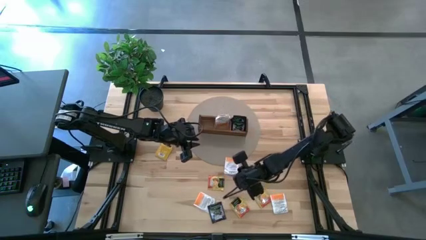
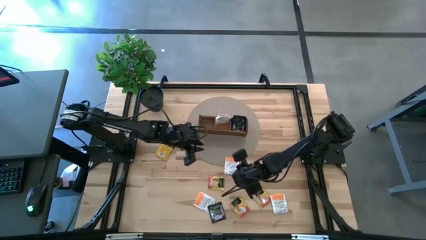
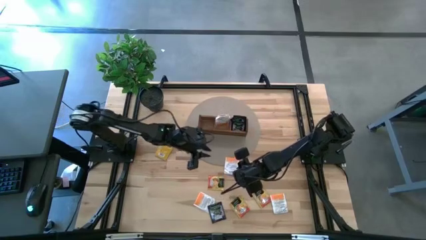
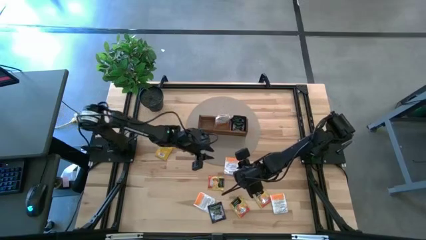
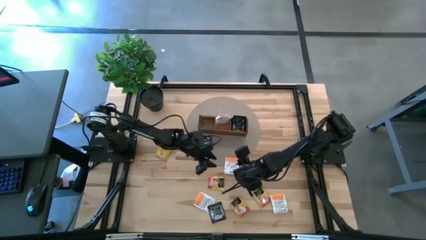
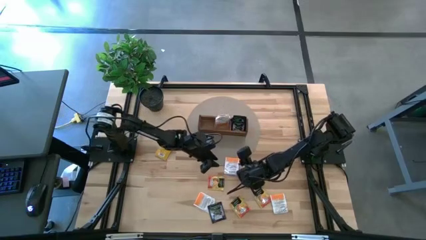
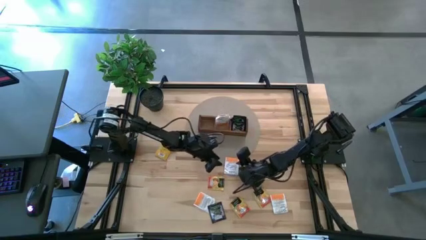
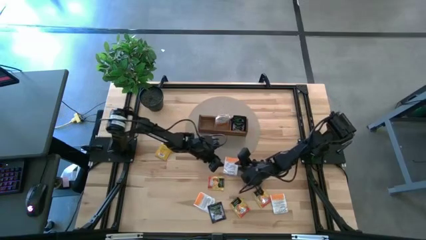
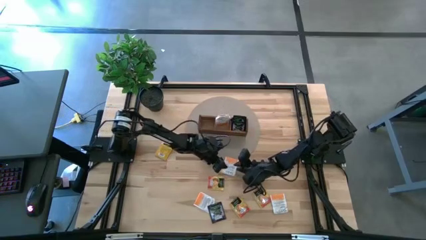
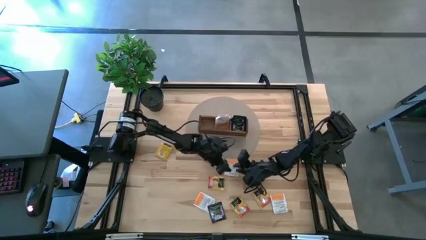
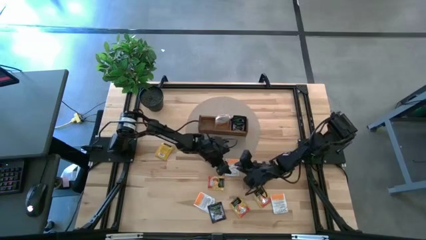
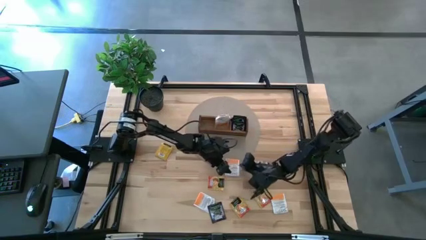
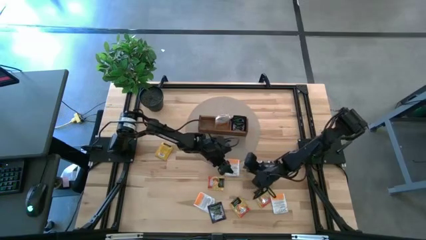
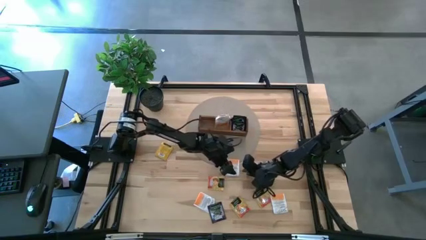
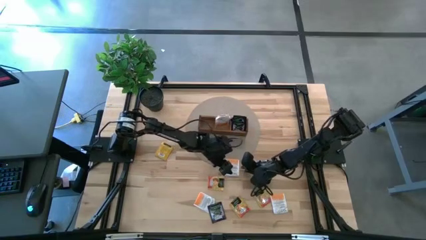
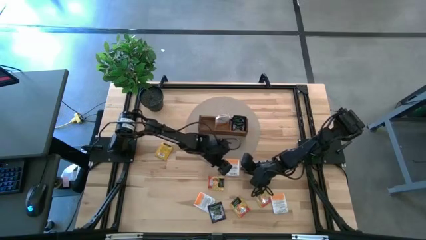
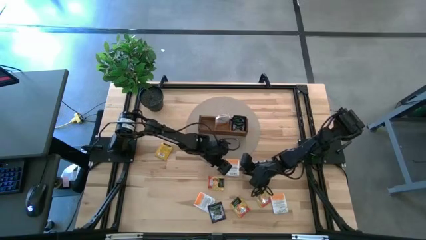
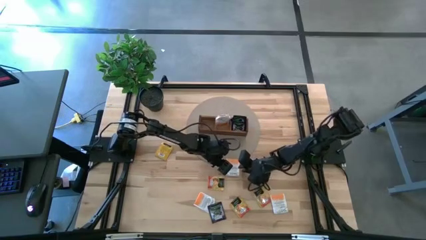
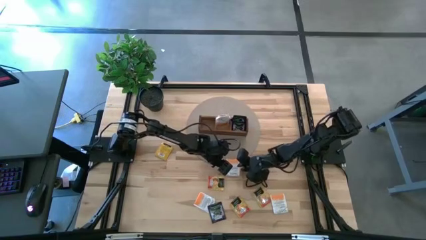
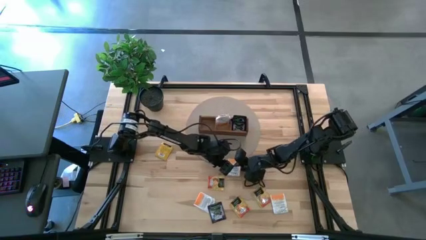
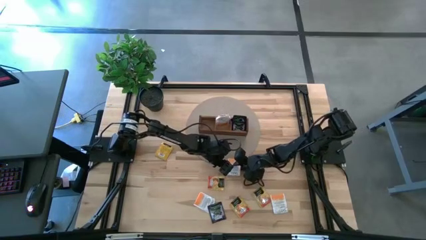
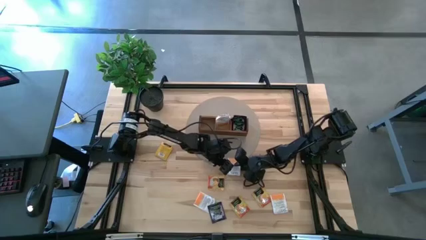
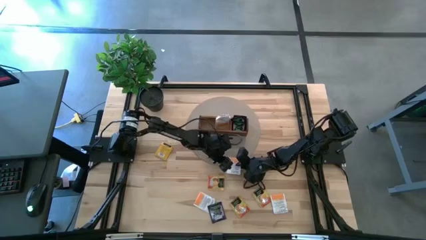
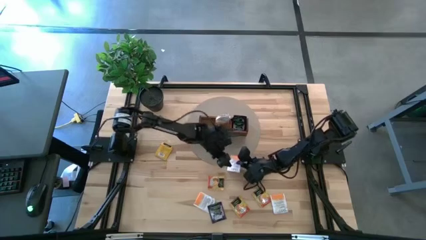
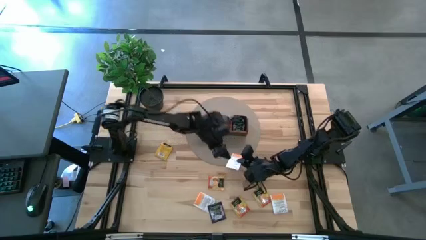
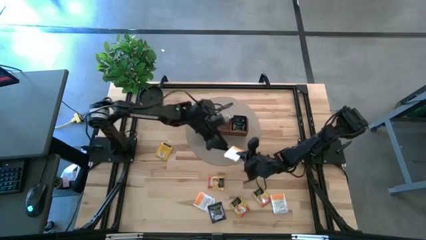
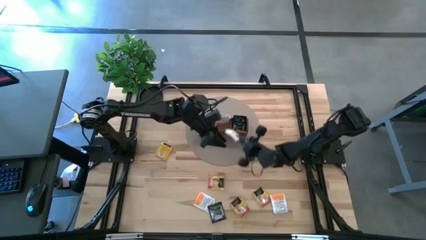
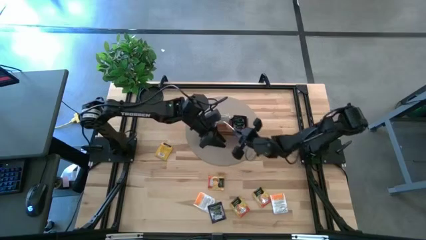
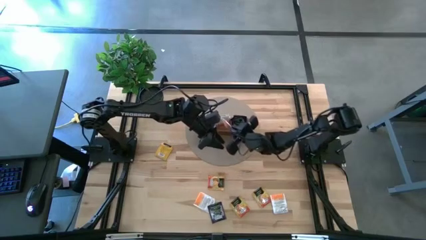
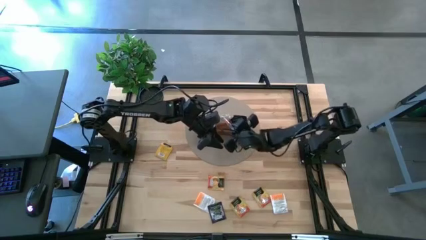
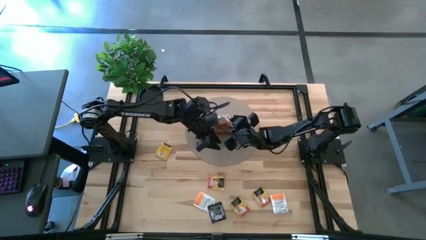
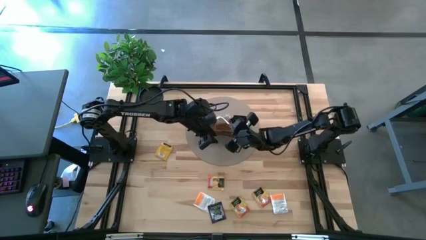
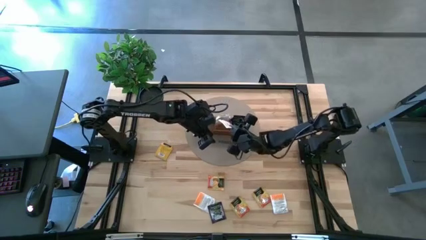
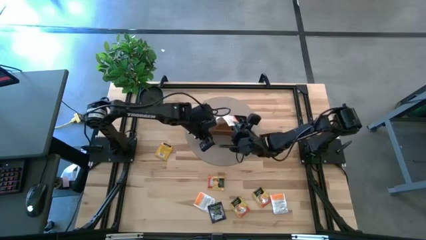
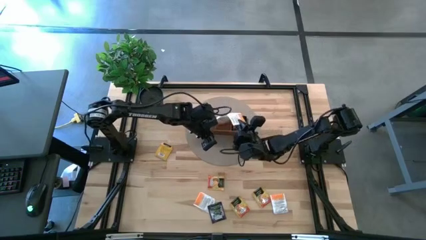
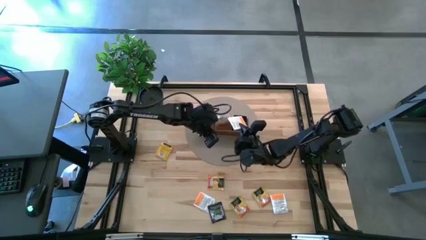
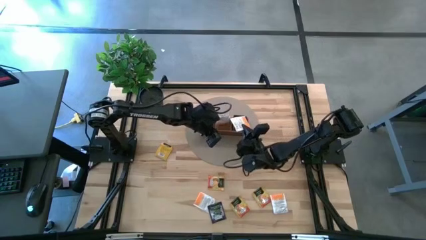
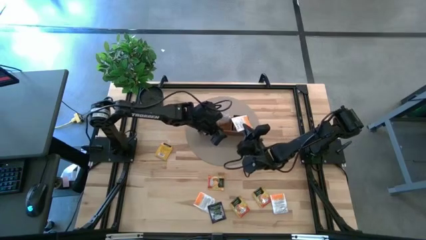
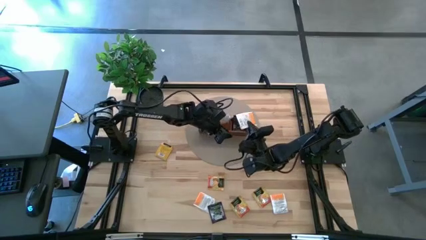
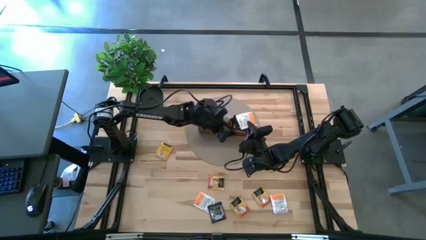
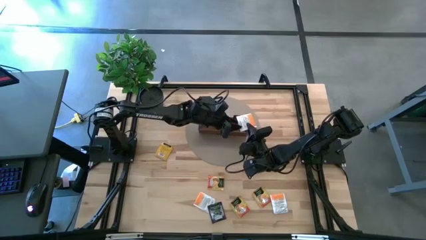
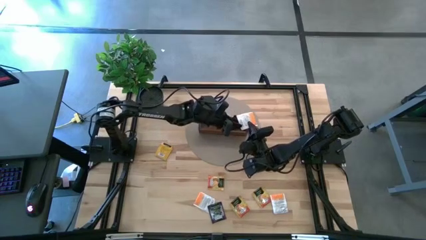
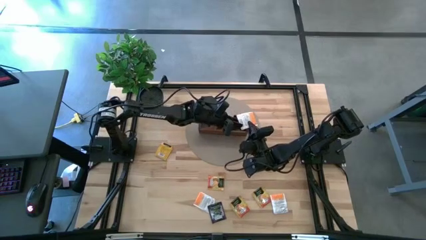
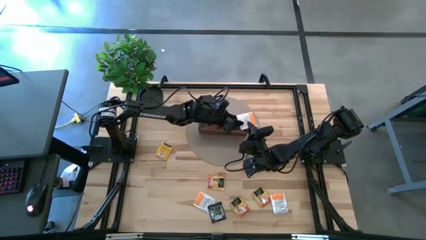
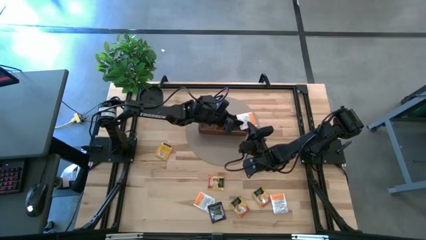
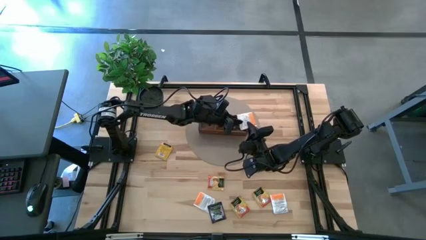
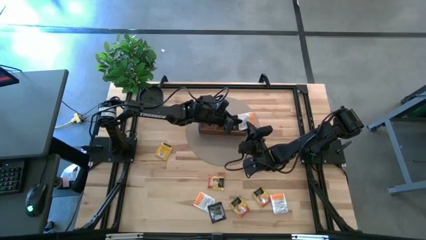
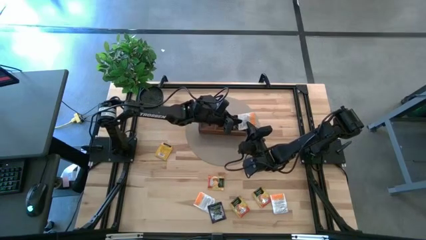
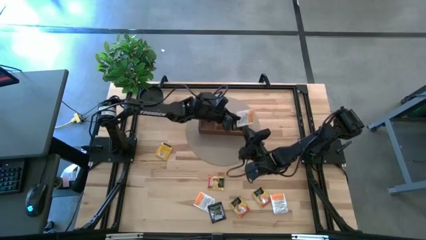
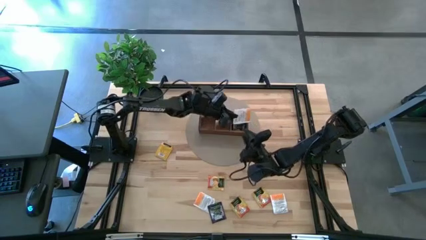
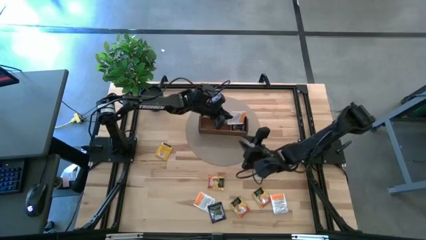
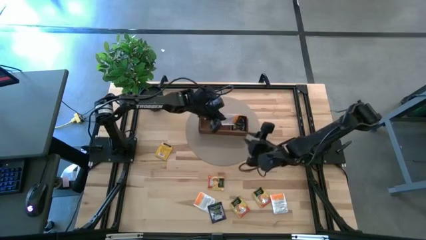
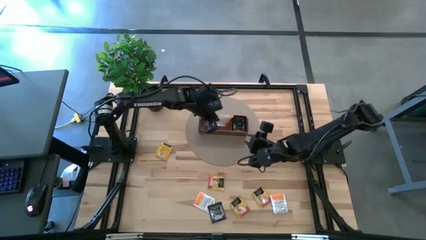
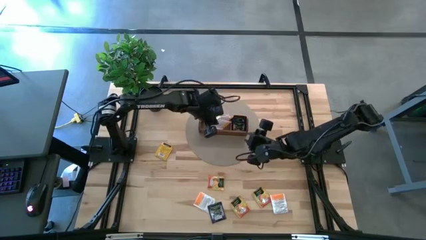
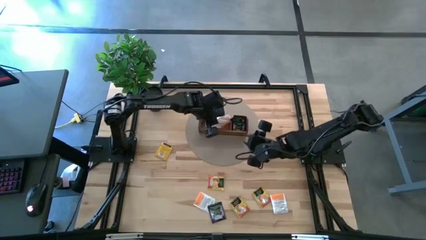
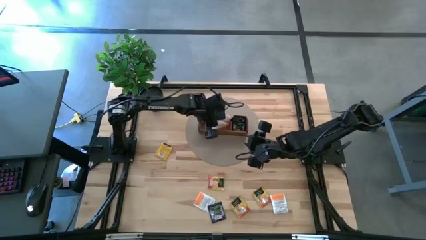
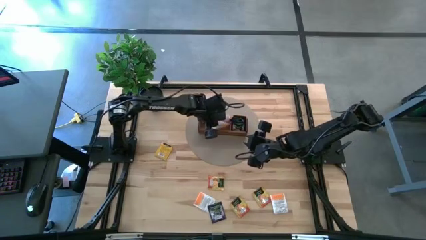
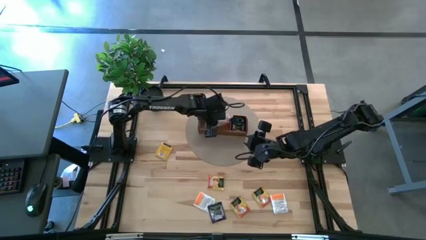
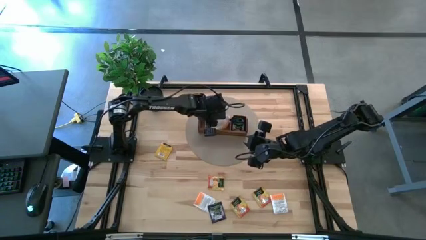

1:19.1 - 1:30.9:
Task: Pick & Place Tea
Put the white tea bag into the middle section of the wooden organizer
